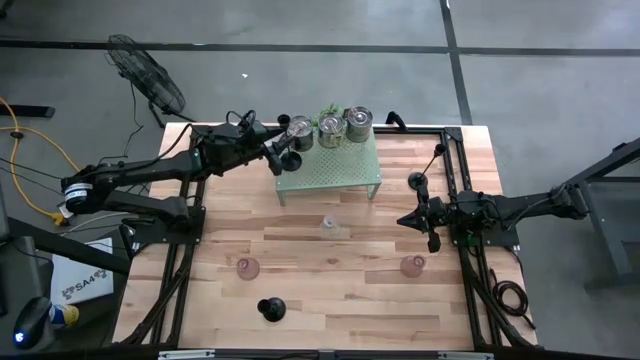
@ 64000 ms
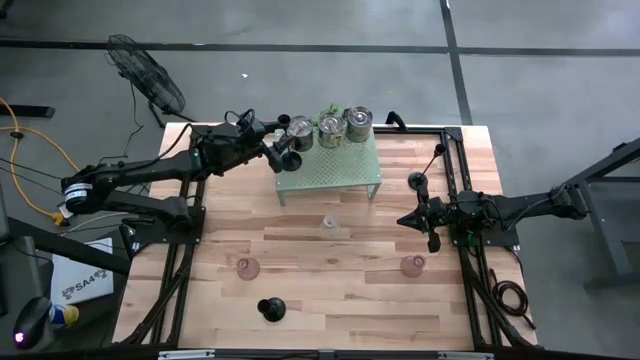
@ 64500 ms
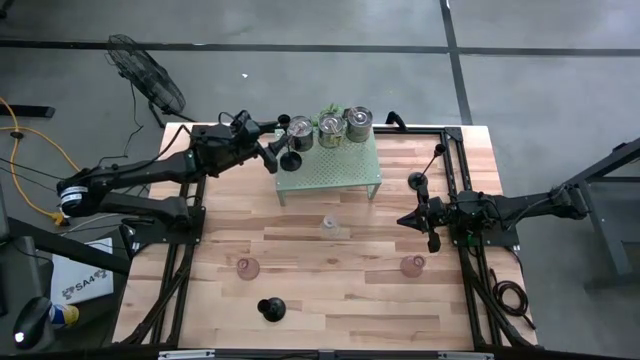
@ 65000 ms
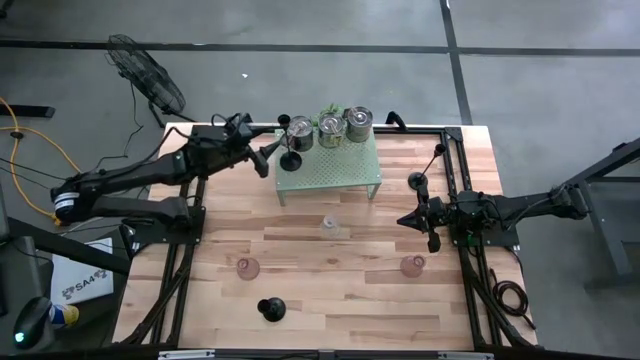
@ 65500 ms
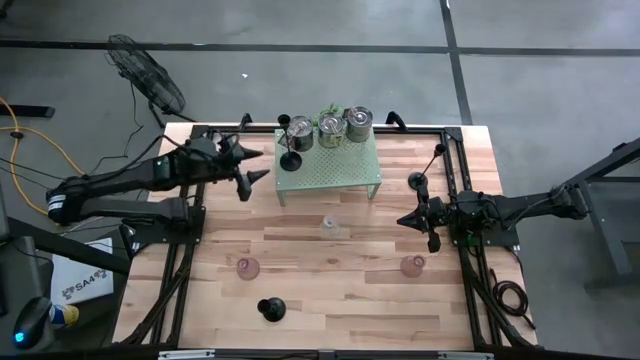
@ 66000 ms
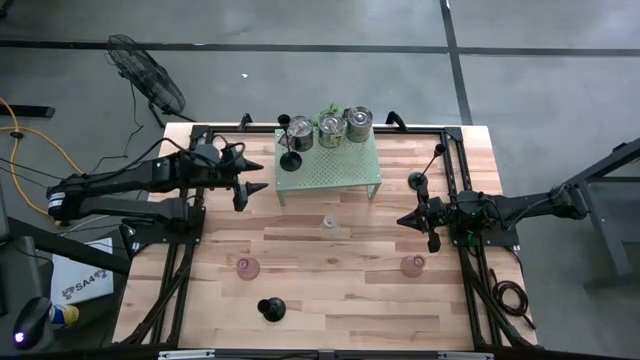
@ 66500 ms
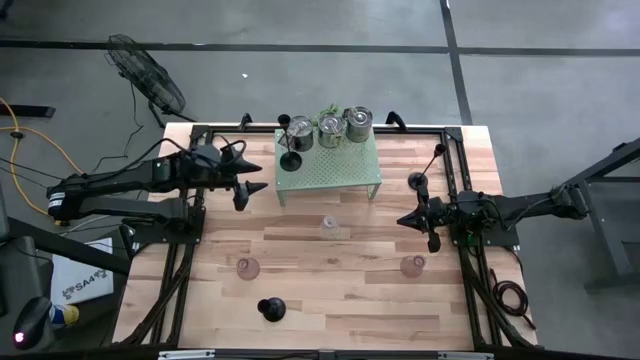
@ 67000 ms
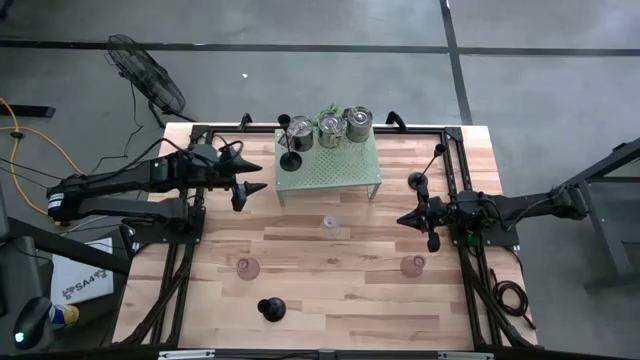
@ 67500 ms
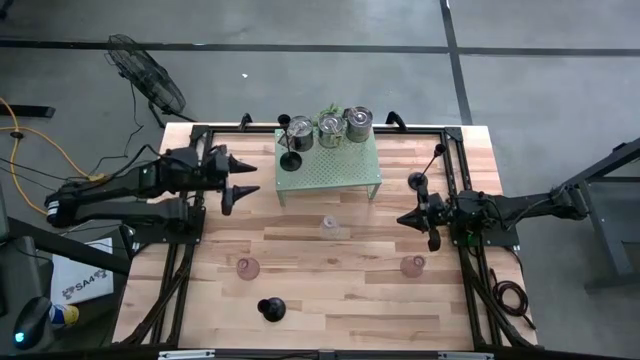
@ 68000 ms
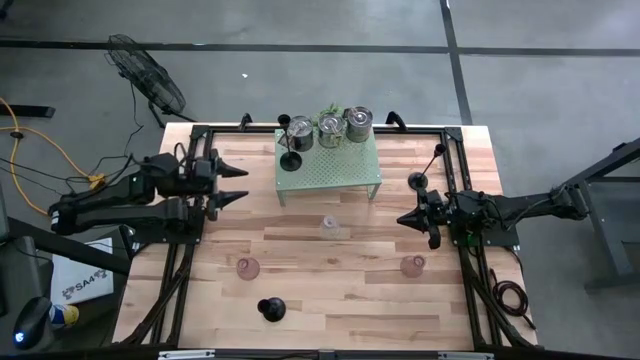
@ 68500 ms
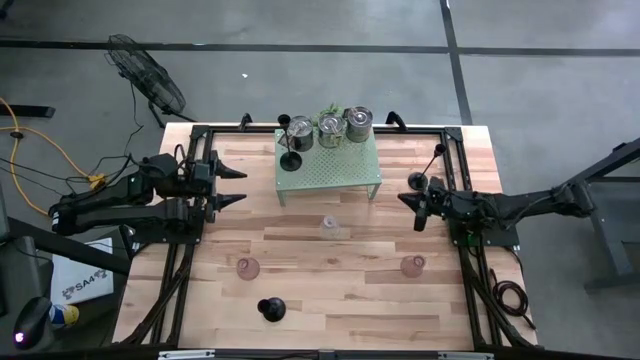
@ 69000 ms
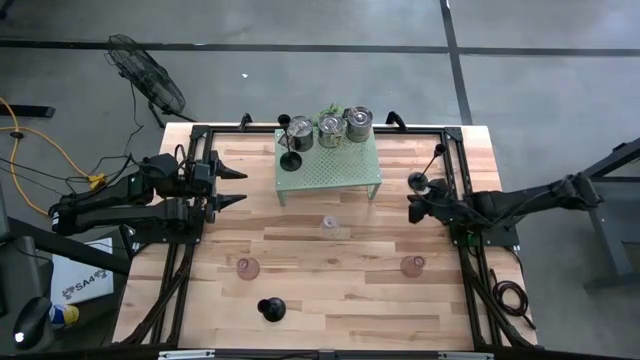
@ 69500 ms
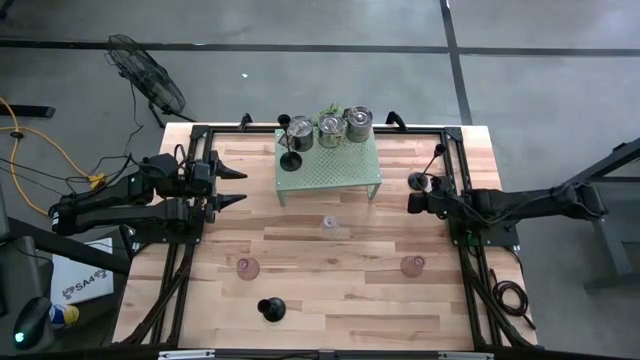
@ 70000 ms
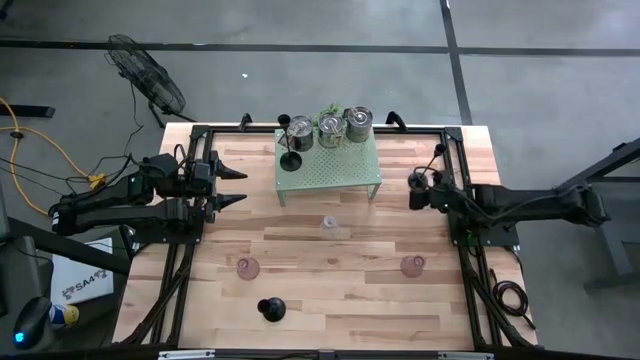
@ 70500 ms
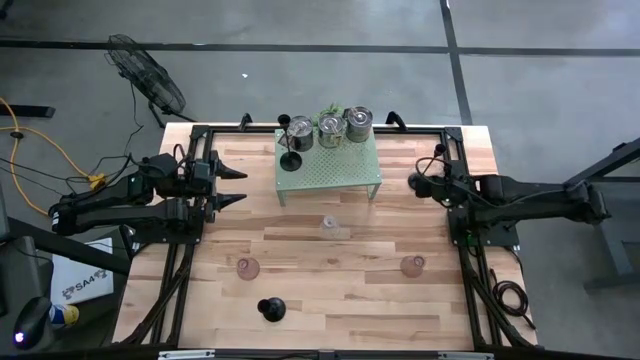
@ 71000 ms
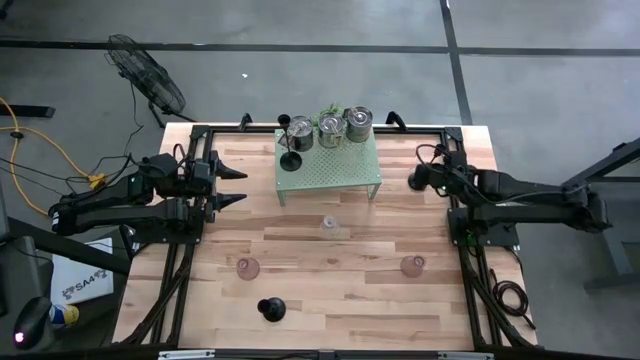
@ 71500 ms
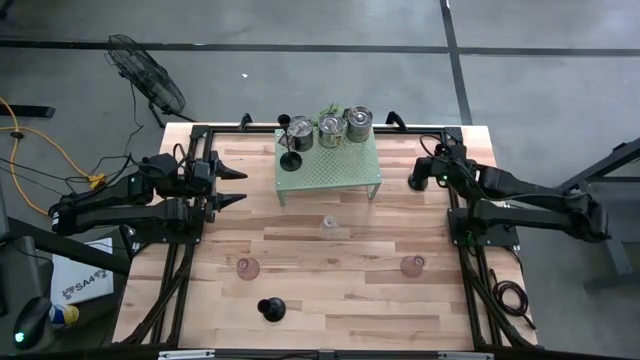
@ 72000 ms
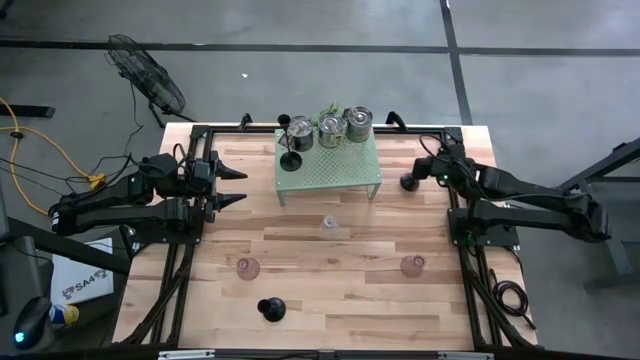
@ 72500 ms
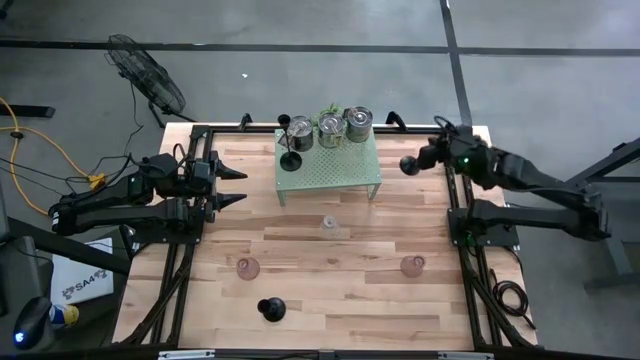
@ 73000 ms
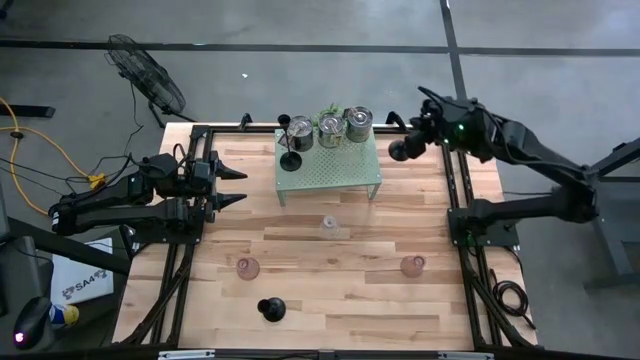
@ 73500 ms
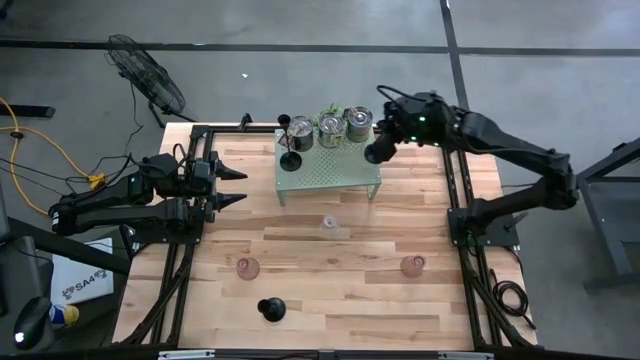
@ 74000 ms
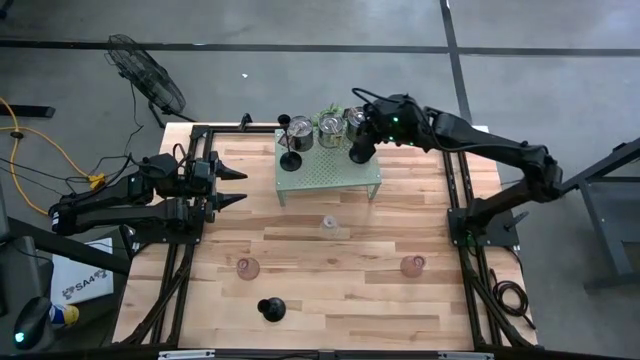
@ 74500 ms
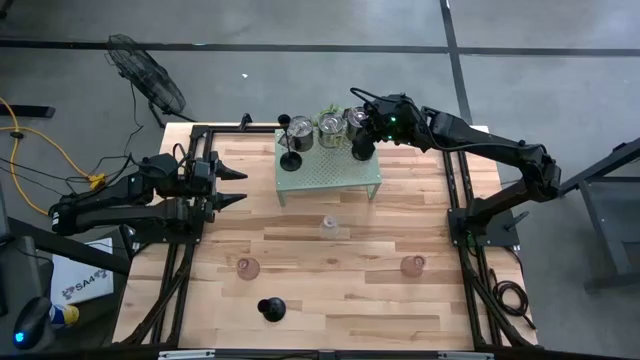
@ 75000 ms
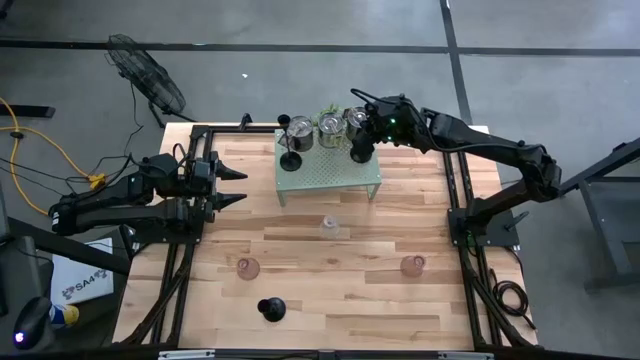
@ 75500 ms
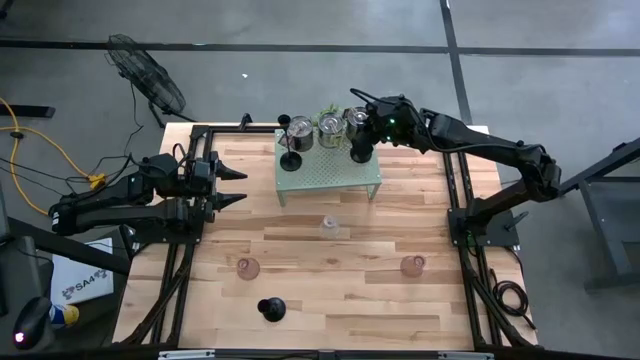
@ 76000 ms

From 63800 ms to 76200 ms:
Task: Pick & Place candle stick holders
Put the top black candle holder on the shelf aligned with the black candle holder
